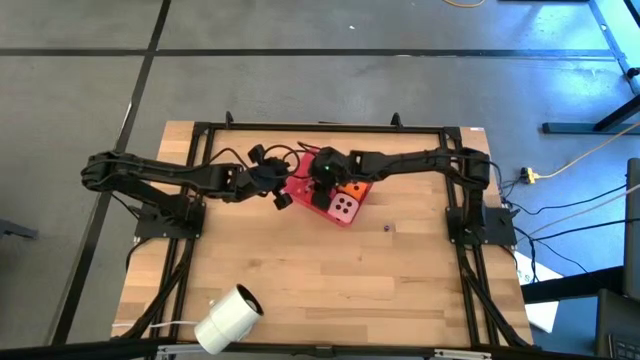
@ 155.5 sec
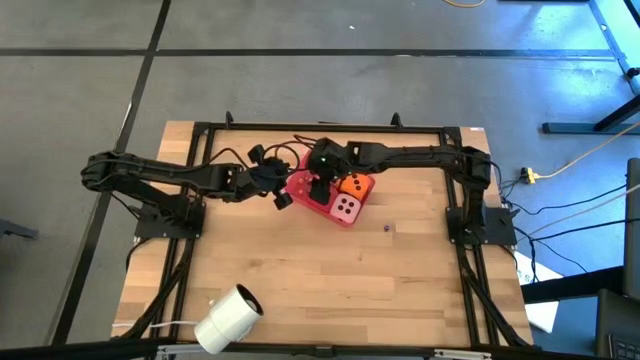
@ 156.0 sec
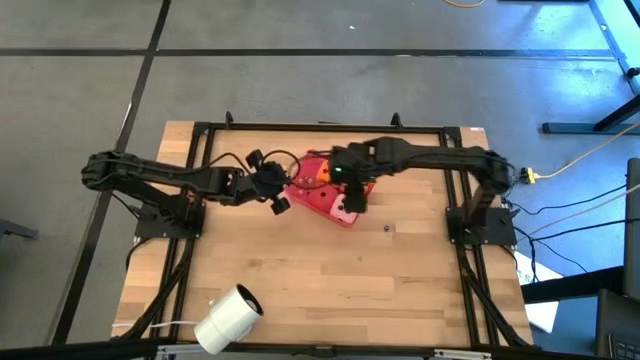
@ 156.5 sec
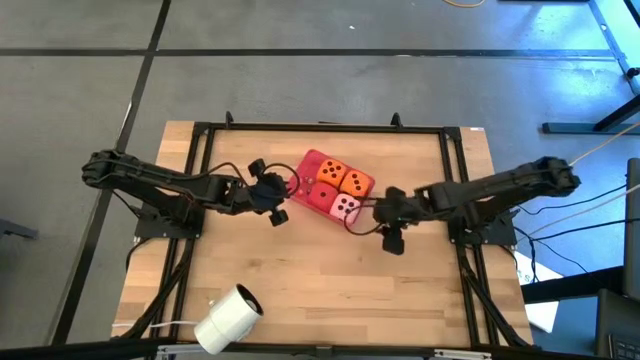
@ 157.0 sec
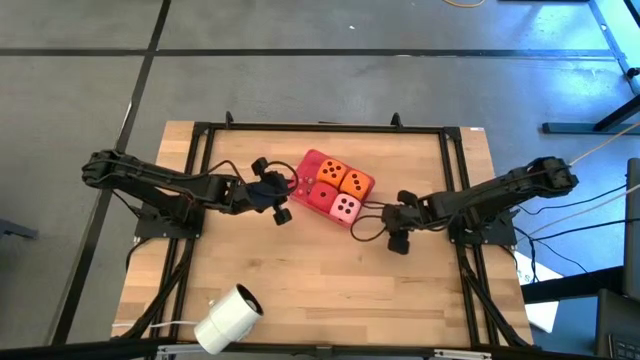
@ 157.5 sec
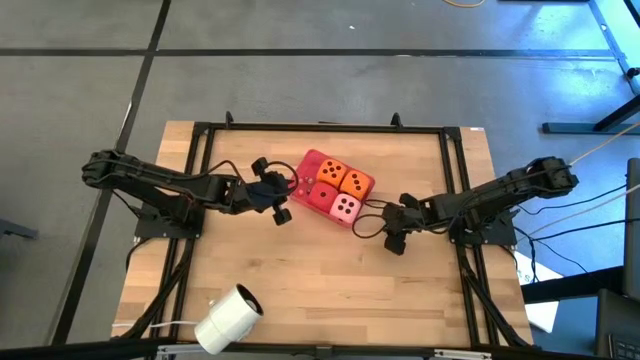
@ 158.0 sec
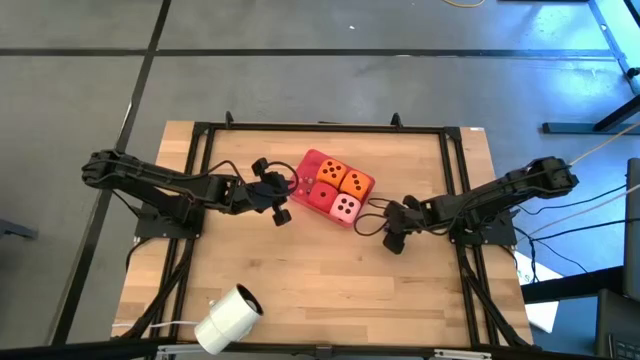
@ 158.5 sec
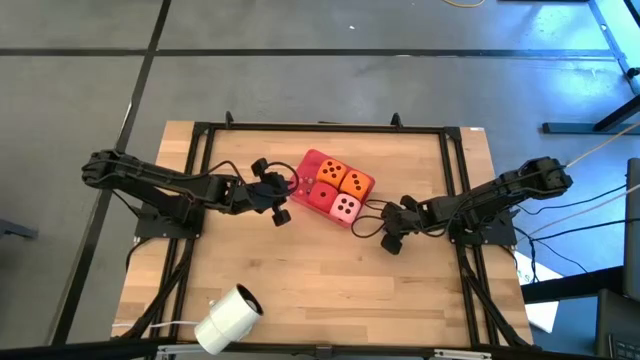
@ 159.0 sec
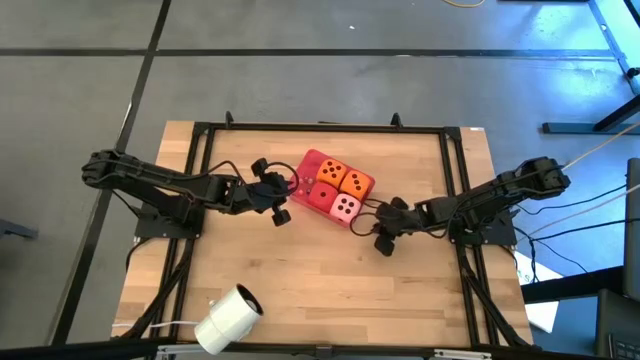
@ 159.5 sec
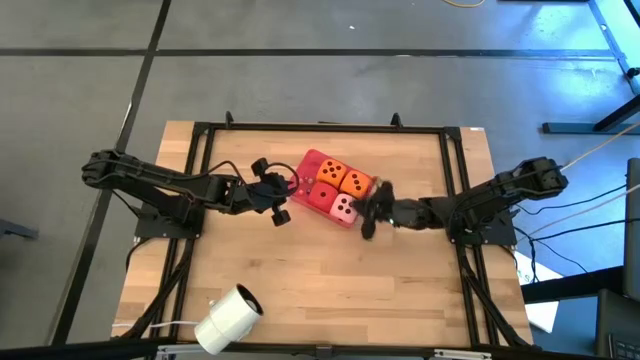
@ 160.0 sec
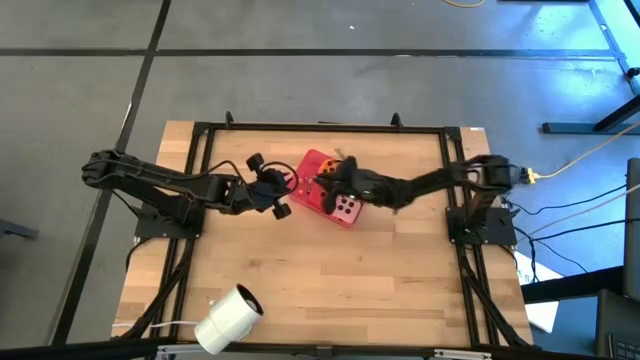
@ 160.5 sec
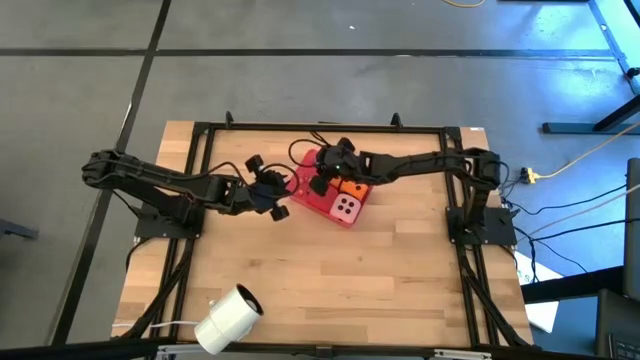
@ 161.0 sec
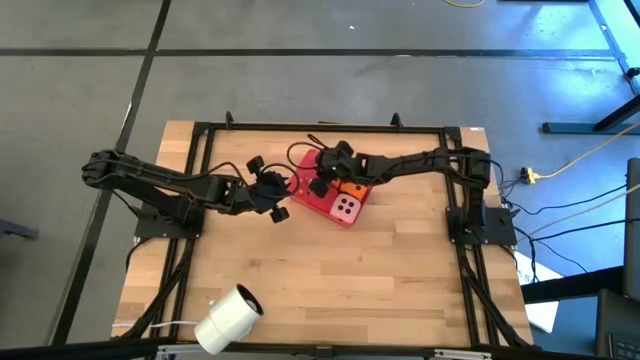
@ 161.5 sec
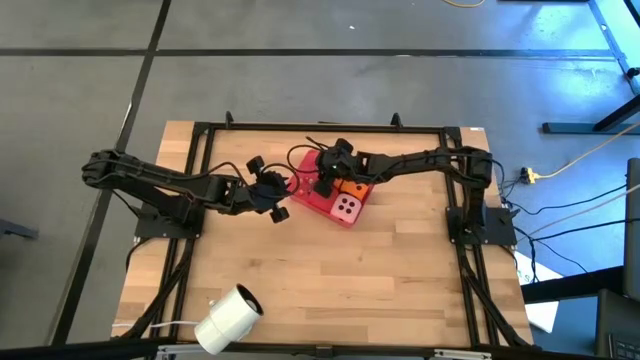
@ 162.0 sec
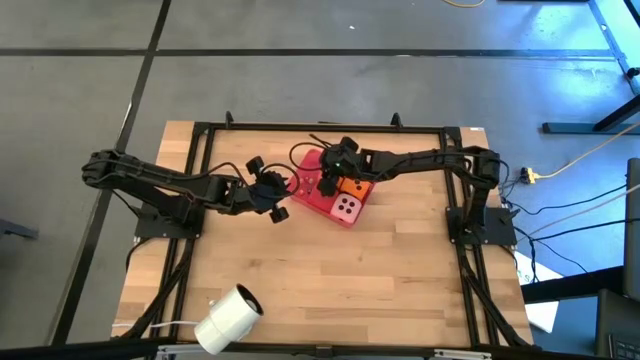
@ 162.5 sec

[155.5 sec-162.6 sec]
Task: Pick & Place Dice
Put the small blue die into the red bin

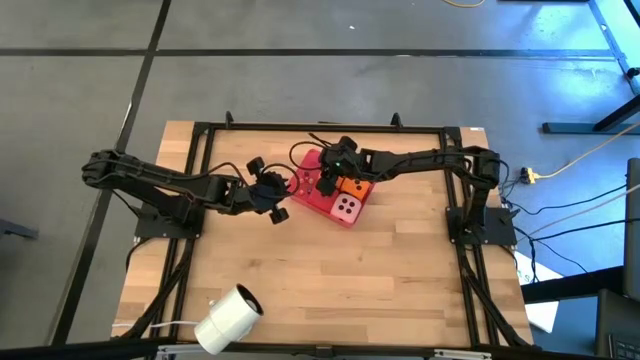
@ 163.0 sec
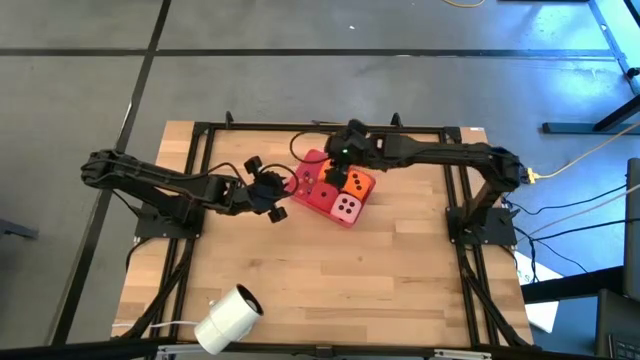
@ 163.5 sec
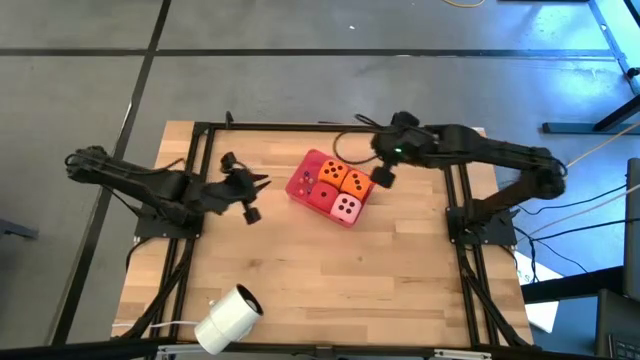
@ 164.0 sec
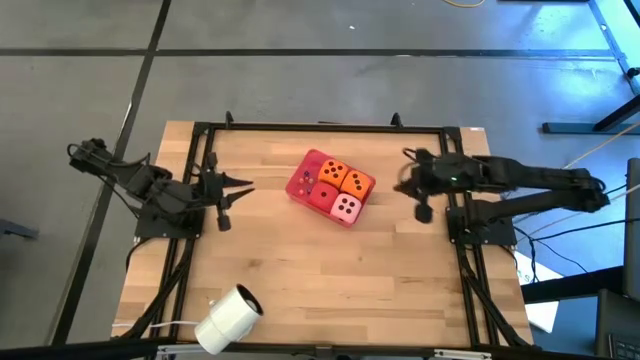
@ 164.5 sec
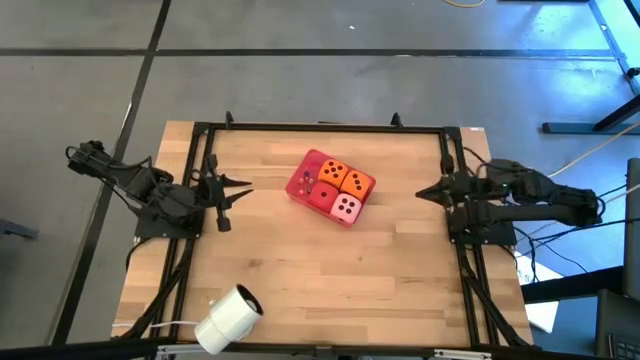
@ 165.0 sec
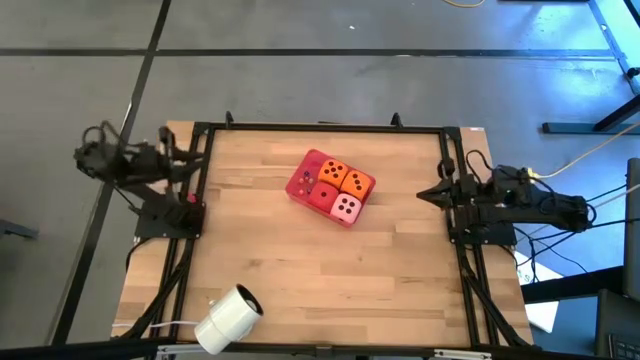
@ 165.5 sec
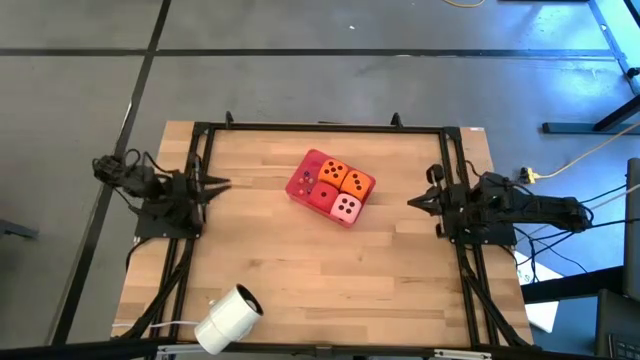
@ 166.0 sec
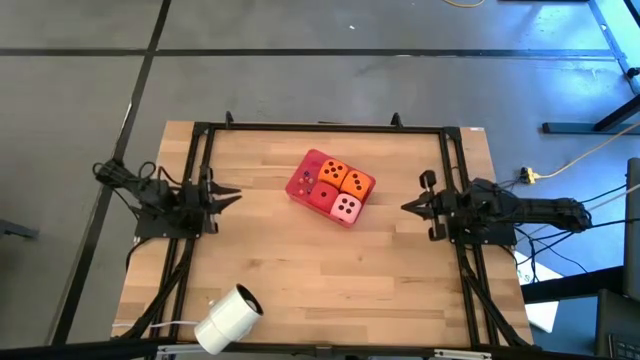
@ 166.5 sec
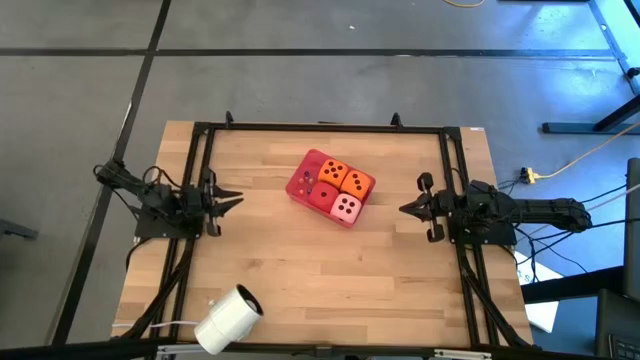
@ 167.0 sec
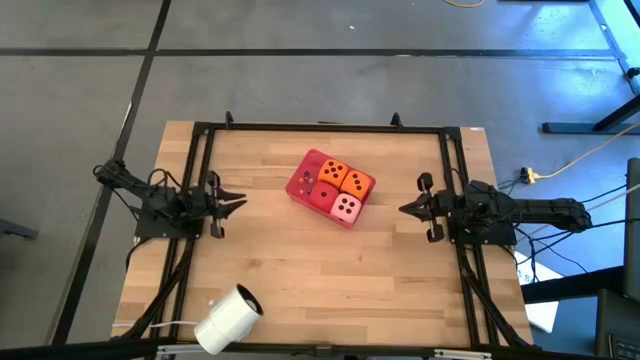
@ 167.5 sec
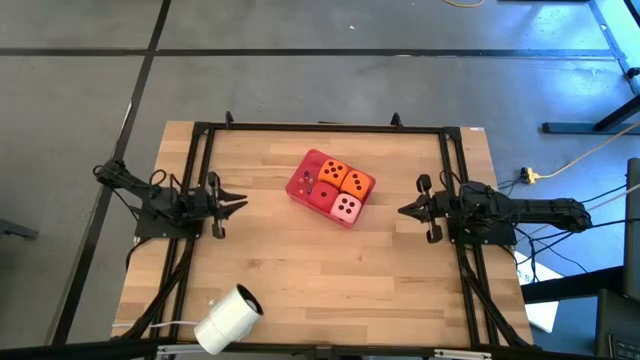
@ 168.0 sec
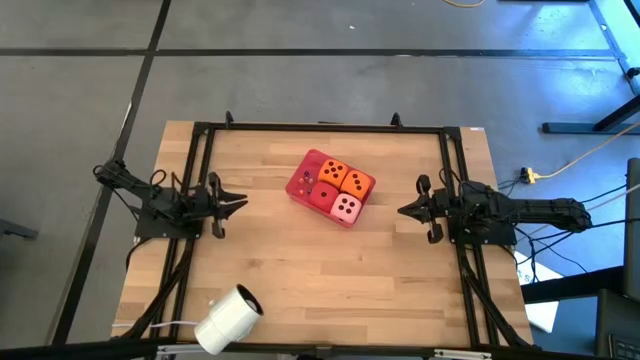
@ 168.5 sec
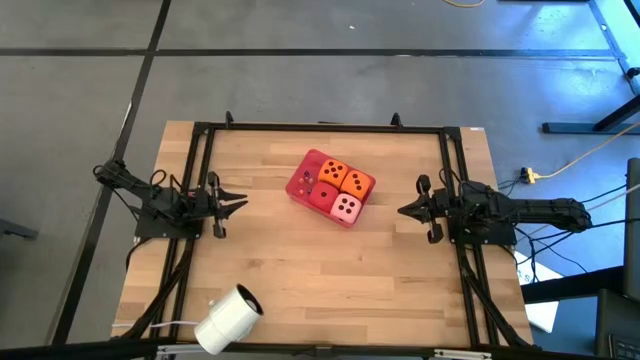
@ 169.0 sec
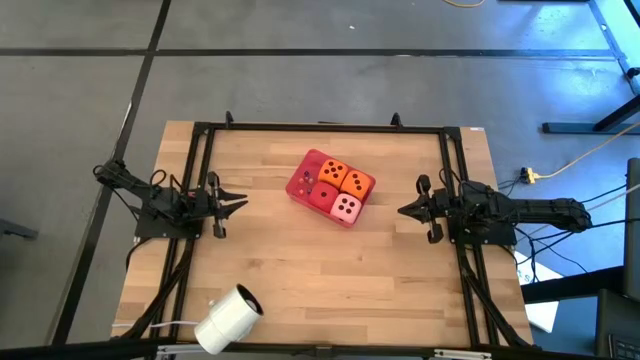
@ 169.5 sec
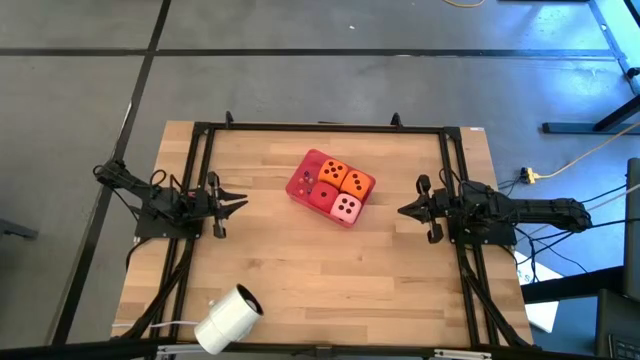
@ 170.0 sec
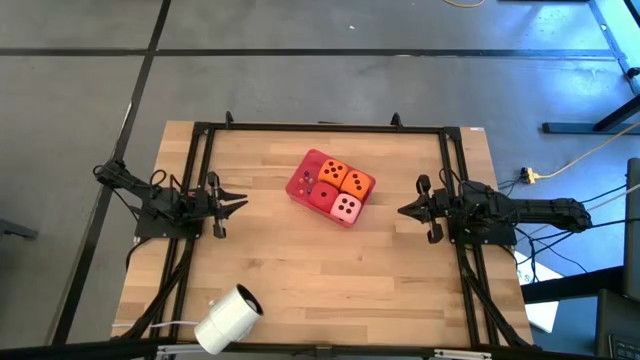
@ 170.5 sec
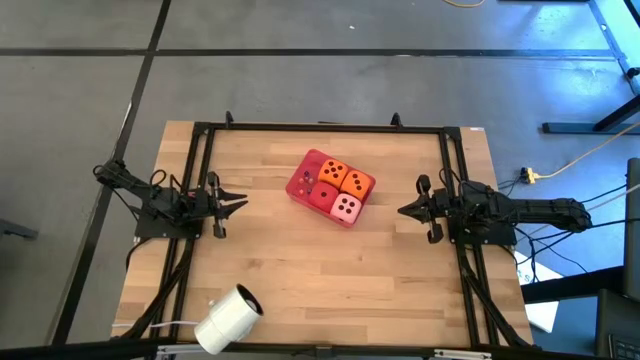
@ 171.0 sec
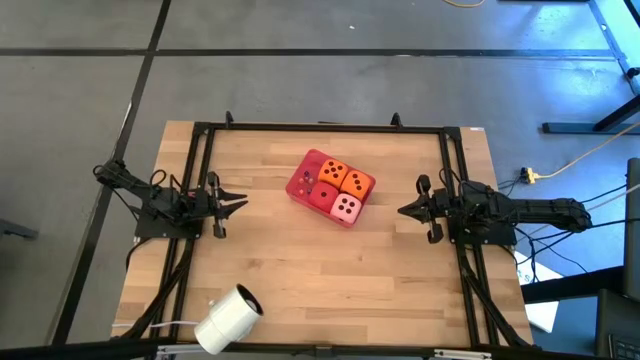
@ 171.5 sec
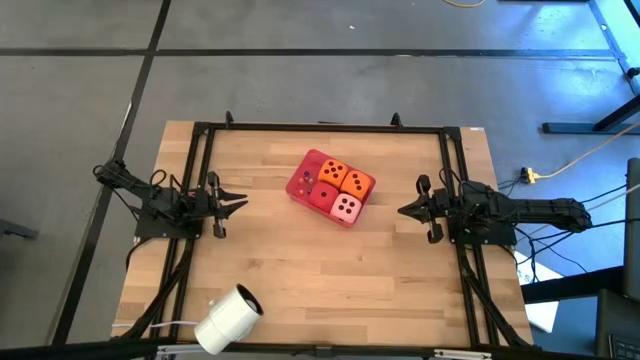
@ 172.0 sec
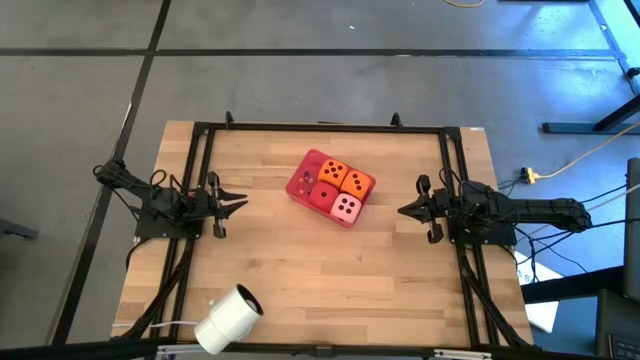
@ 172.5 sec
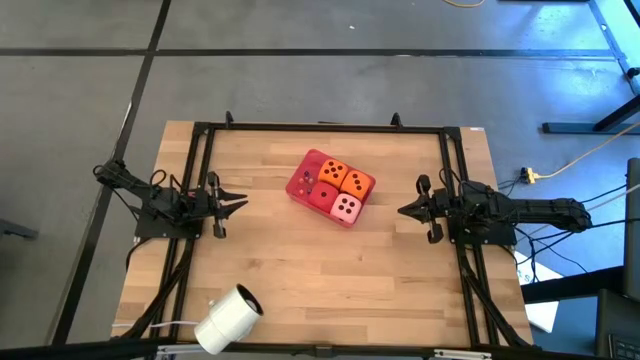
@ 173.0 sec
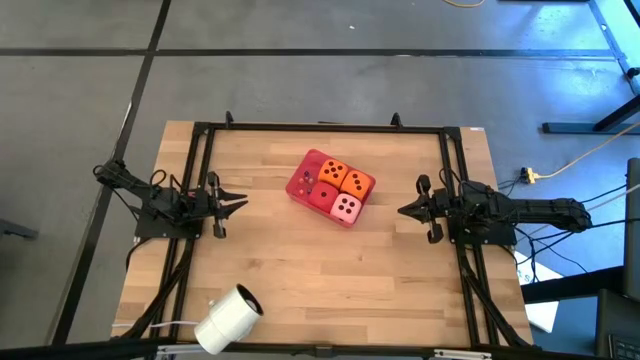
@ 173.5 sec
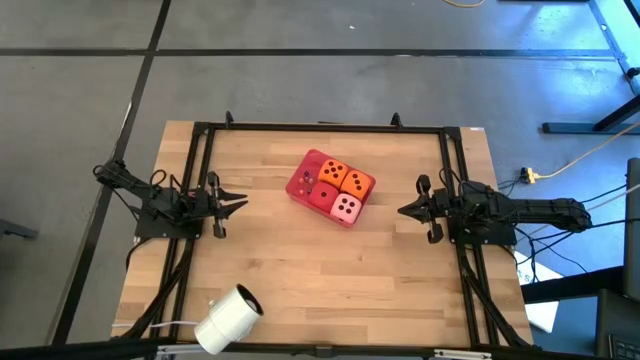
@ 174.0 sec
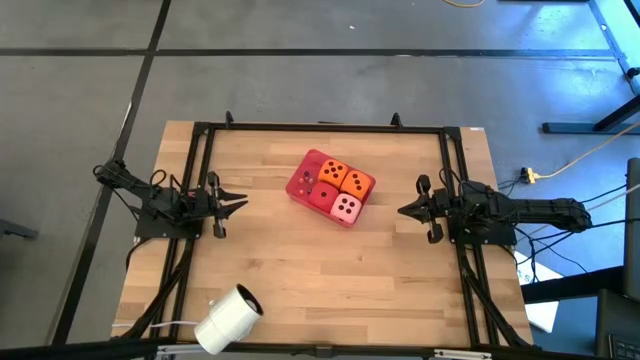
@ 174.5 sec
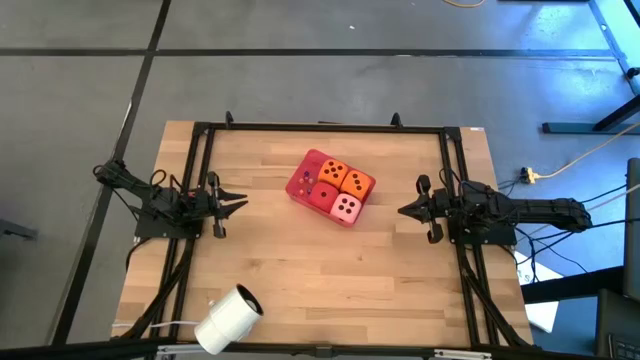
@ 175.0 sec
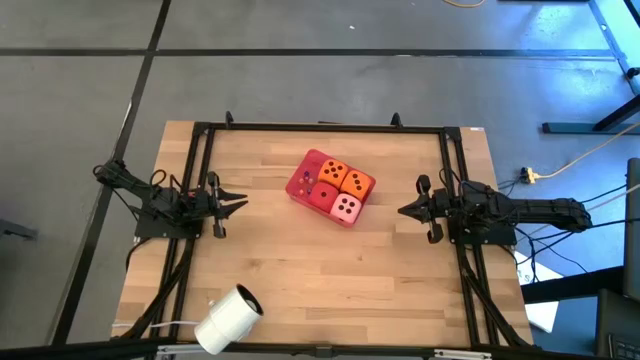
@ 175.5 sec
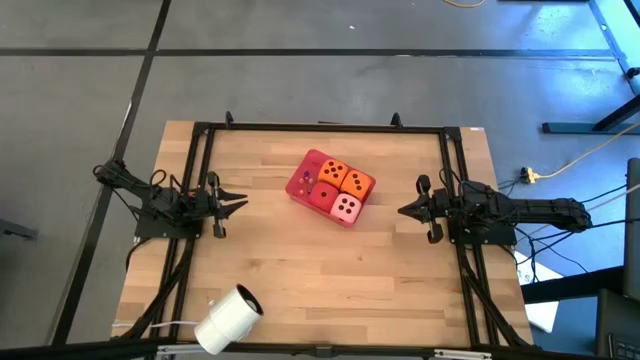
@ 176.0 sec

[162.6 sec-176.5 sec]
Return to Home Position
